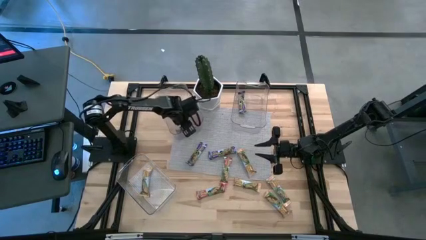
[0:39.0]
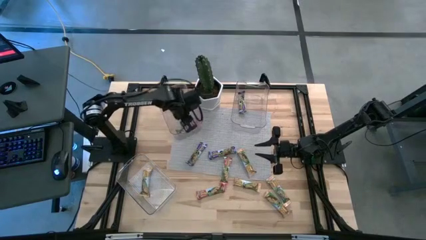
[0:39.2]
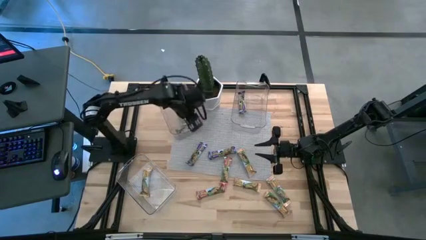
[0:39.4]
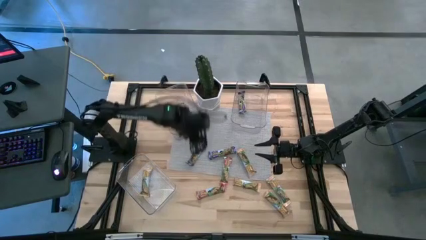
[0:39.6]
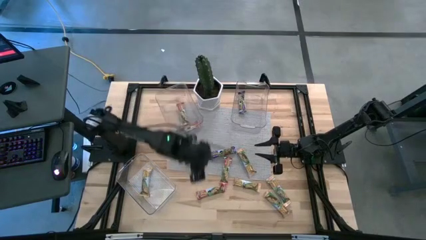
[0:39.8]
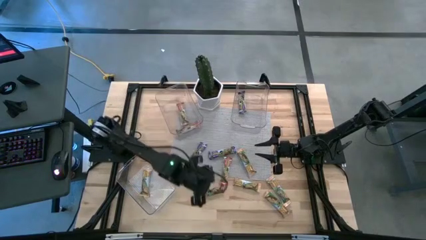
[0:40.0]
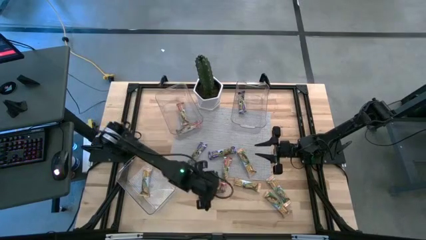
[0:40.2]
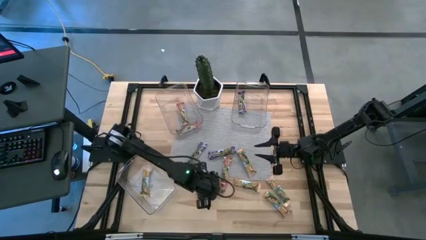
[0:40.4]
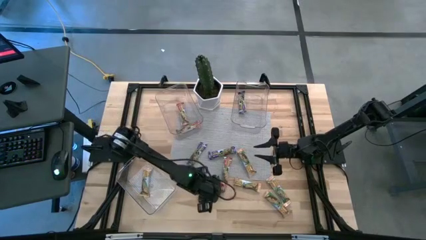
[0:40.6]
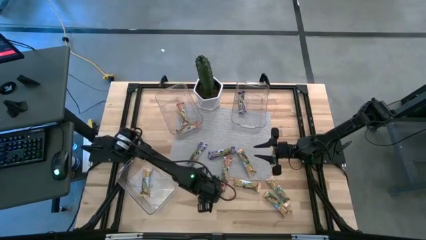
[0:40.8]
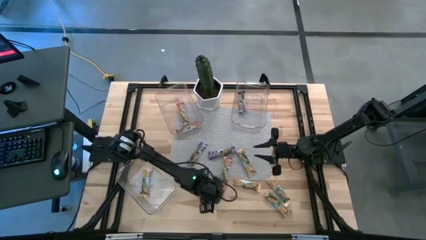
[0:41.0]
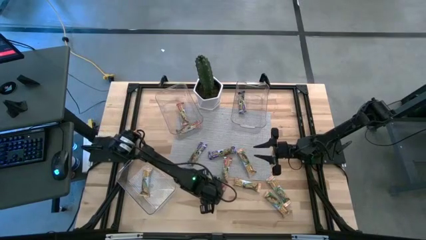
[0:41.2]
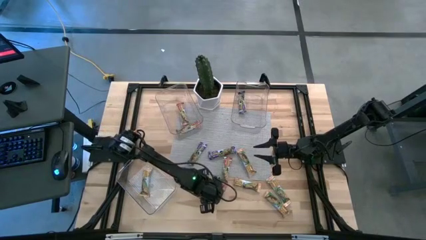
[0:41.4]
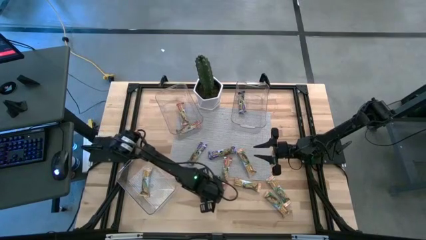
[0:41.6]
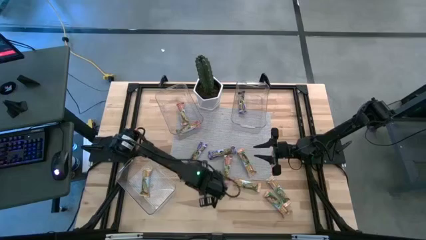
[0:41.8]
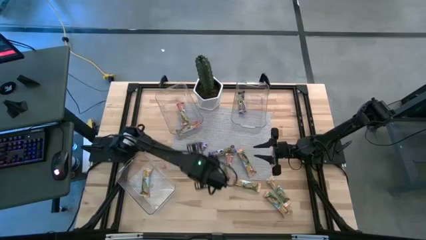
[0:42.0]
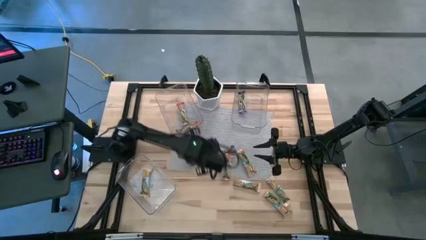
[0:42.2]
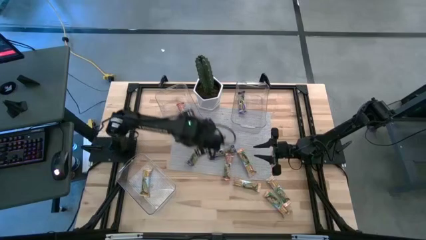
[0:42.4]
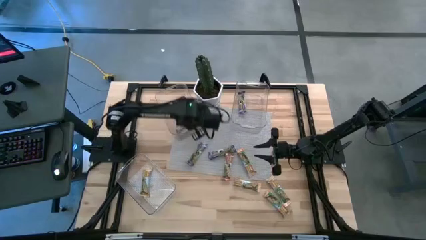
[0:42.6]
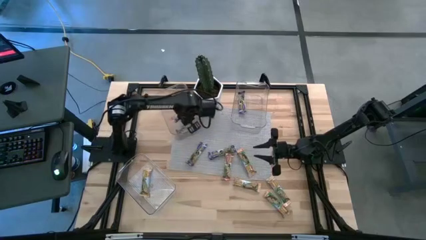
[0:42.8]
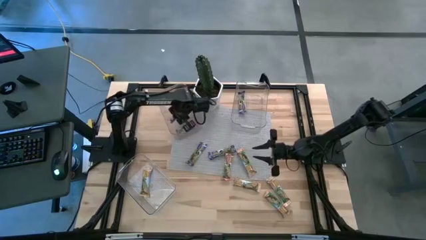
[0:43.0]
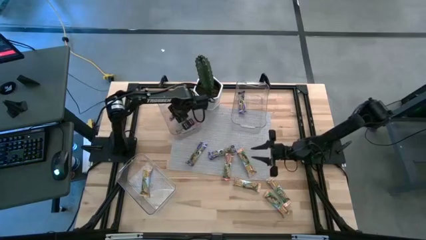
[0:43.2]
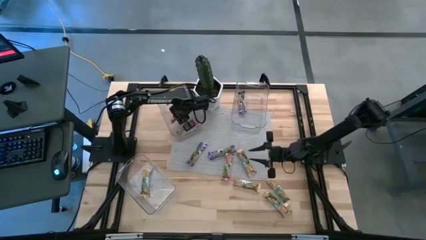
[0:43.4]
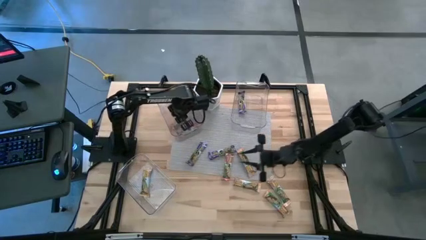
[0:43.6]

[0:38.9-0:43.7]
Task: Pick and place Granola Bars by type
Put the red granola bar into the top left transparent bin

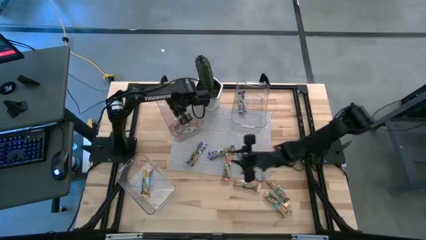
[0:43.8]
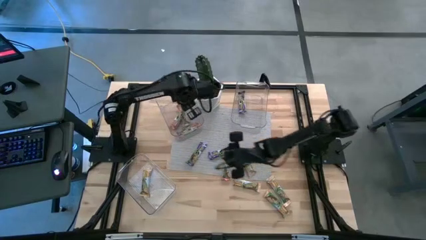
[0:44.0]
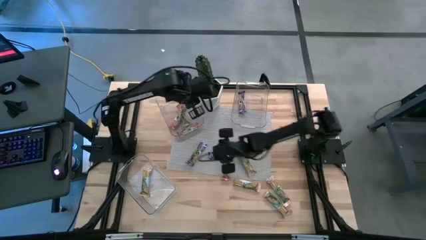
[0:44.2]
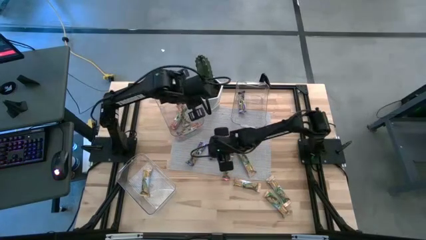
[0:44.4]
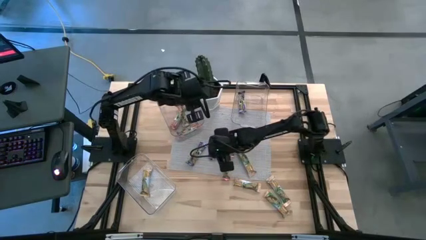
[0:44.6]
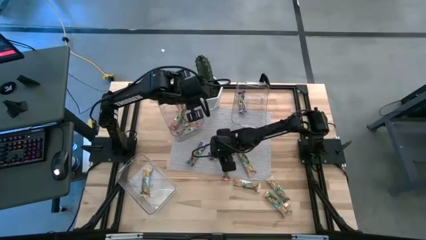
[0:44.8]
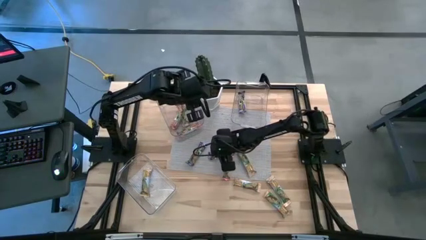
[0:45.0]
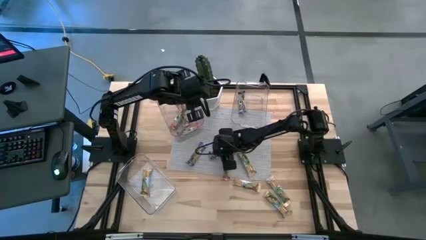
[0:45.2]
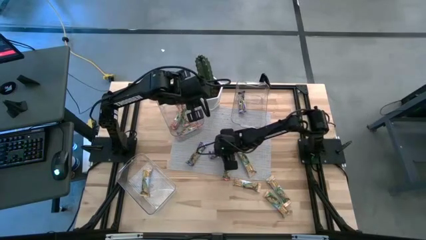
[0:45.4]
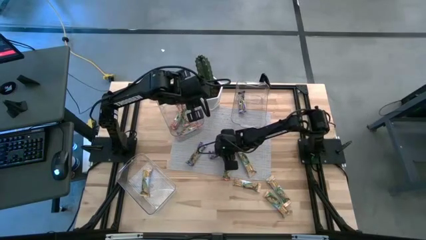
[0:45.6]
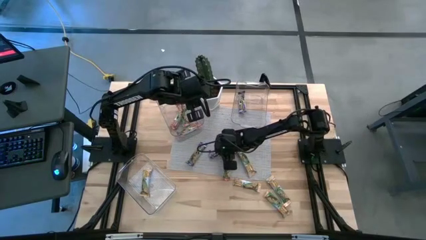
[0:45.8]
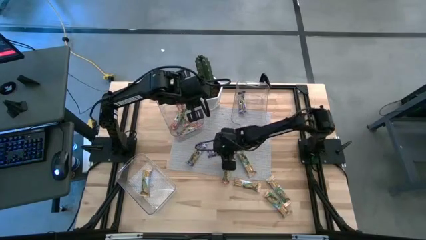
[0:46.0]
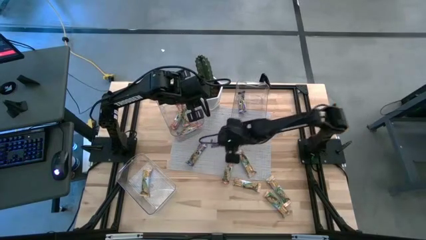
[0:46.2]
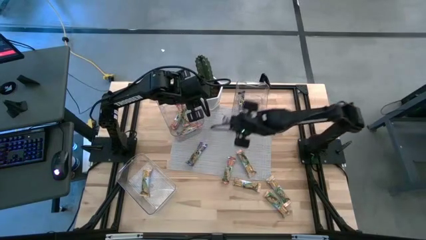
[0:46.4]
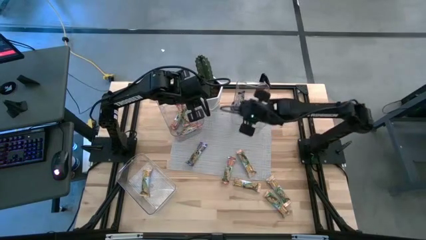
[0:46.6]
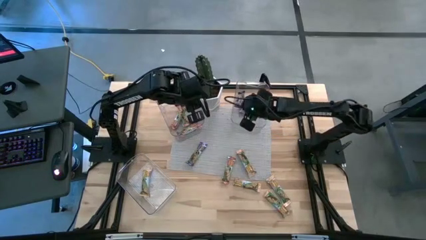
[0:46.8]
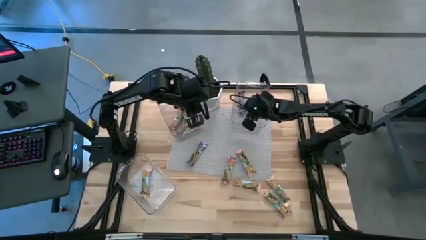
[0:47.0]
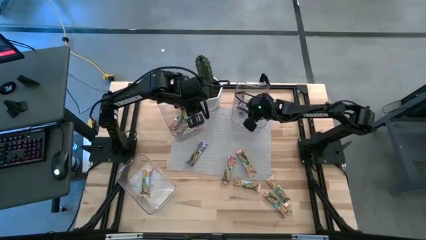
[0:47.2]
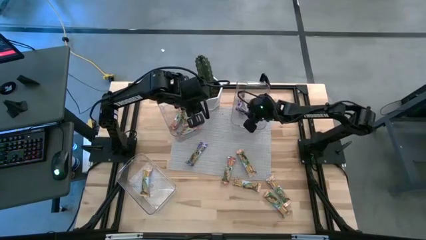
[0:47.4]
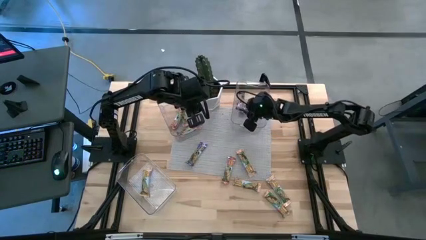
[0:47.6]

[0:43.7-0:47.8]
Put the blue granola bar into the top right transparent bin

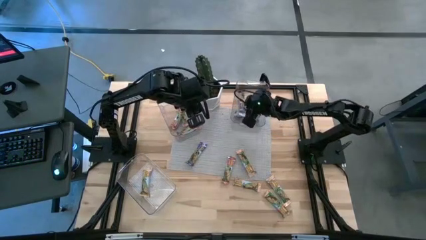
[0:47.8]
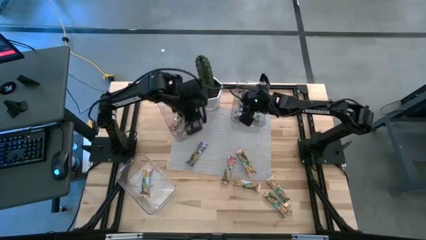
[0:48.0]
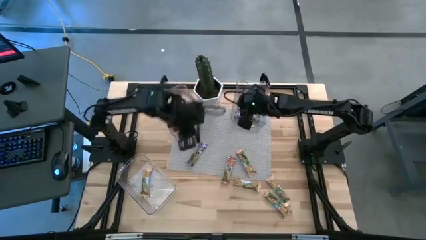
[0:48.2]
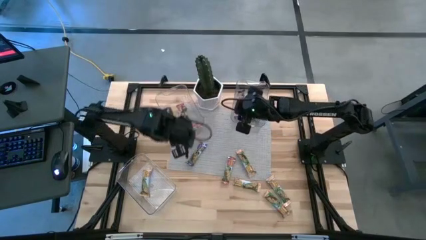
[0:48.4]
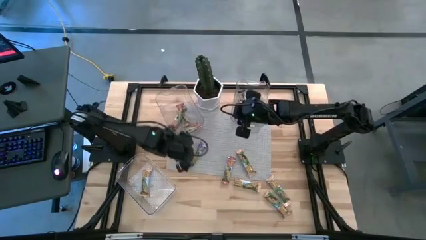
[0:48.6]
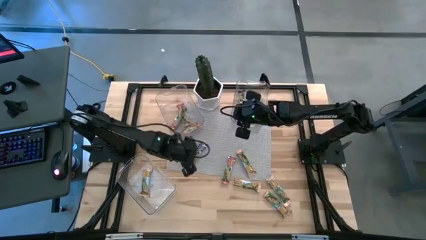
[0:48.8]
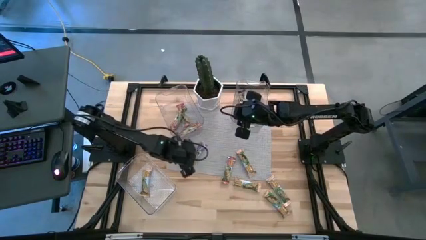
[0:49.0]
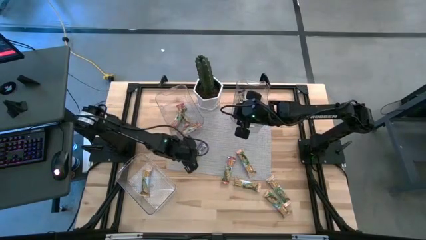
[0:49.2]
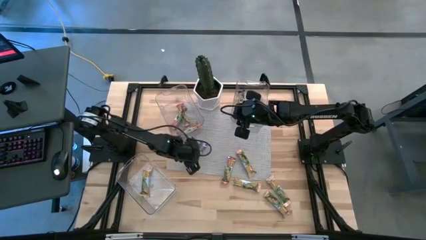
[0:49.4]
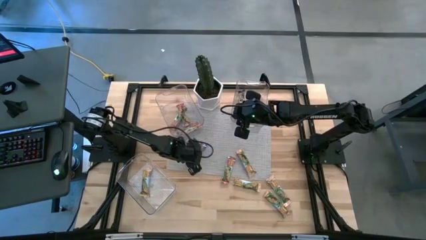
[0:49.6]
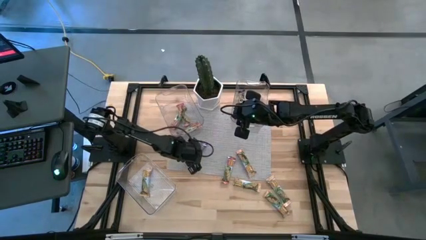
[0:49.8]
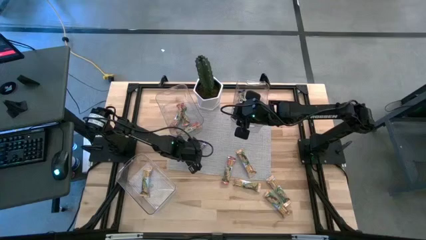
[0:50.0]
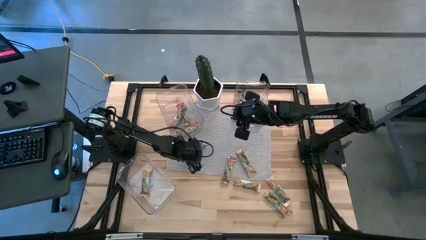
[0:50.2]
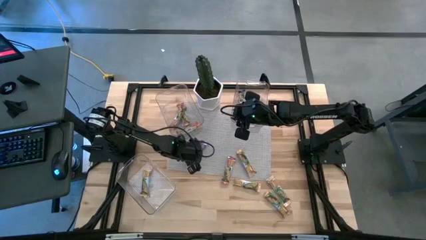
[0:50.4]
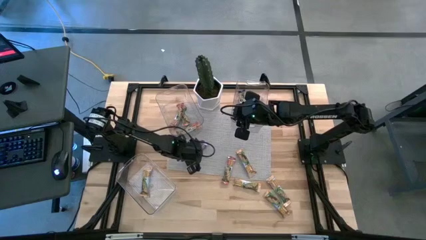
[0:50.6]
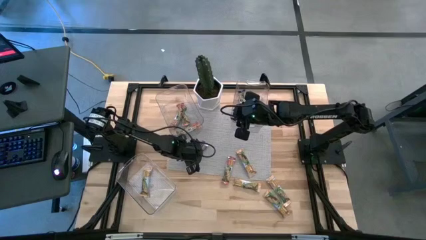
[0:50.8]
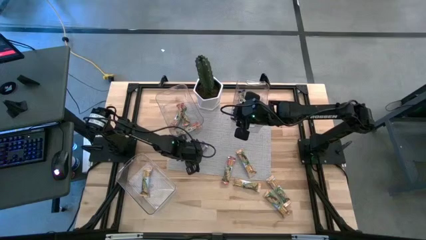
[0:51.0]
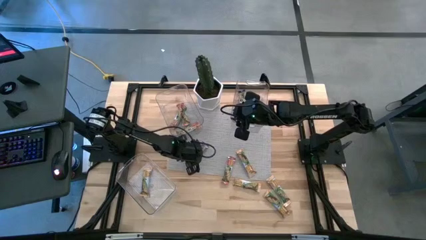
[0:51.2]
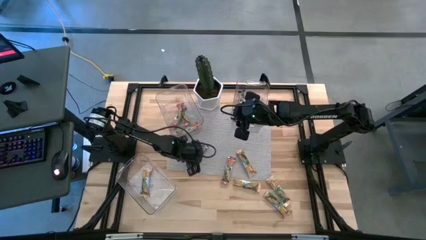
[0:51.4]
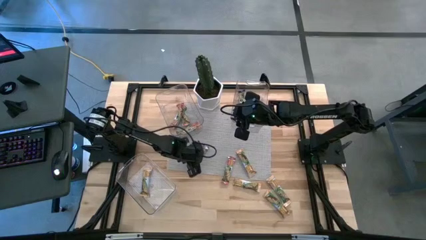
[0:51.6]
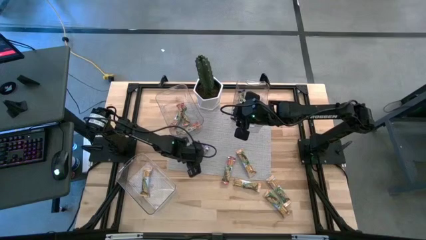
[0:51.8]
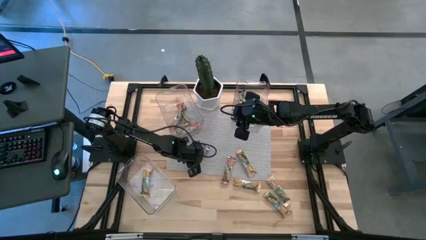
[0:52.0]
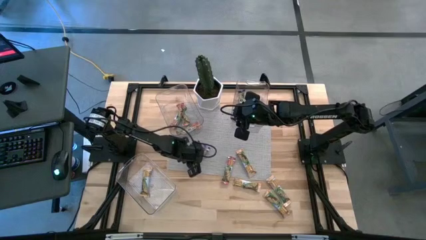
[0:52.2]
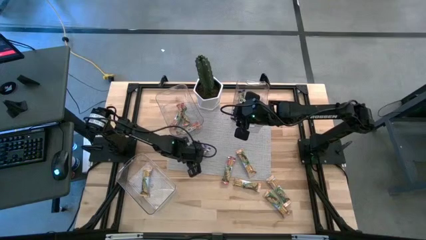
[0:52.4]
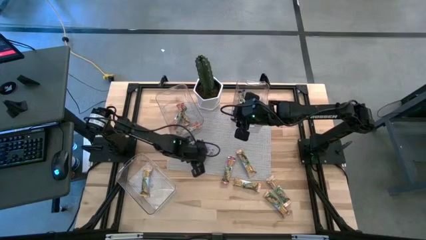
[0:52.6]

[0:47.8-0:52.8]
Put the blue granola bar into the top right transparent bin

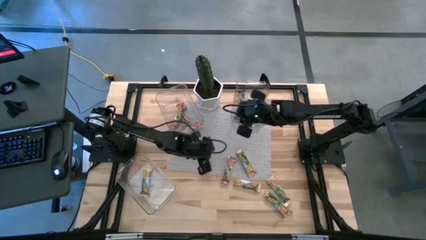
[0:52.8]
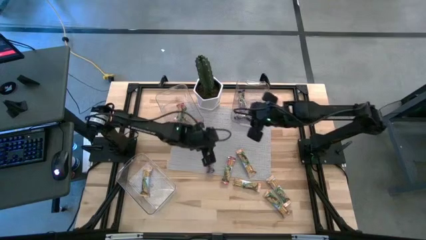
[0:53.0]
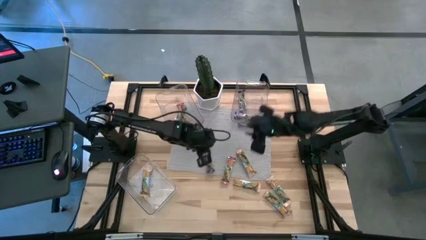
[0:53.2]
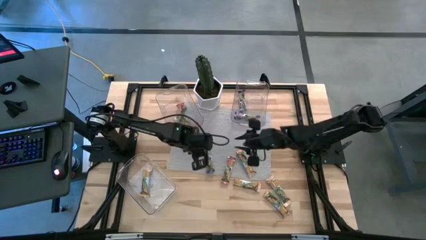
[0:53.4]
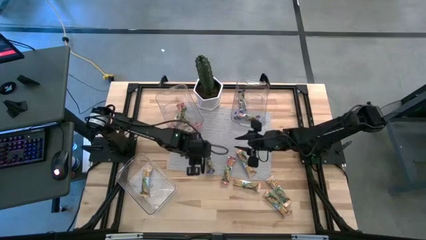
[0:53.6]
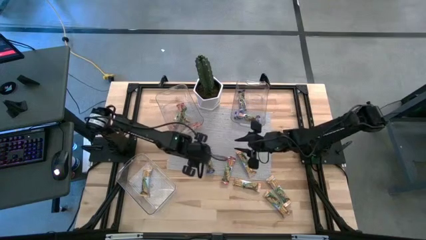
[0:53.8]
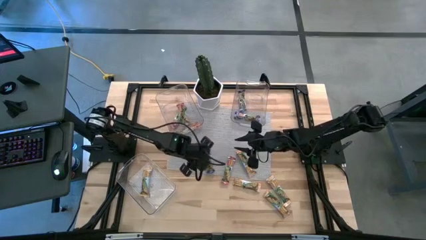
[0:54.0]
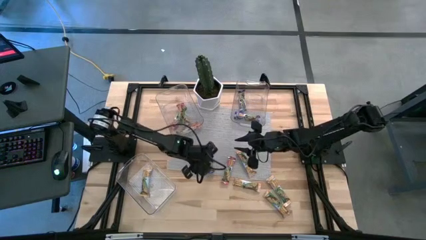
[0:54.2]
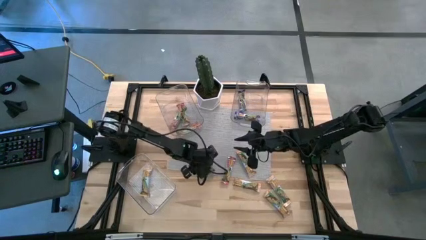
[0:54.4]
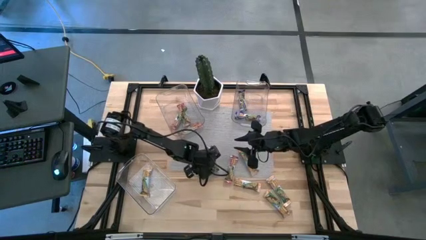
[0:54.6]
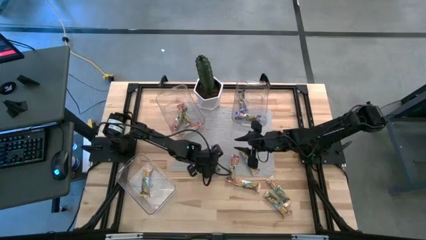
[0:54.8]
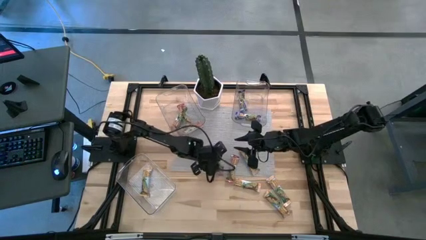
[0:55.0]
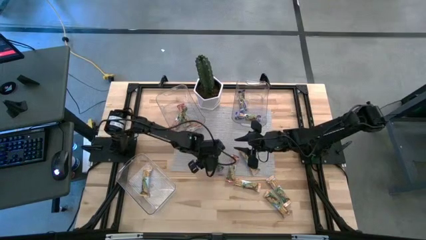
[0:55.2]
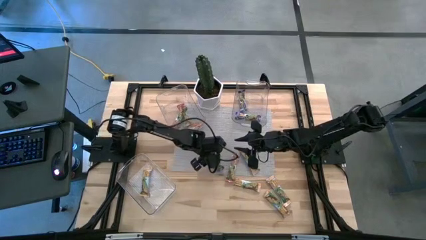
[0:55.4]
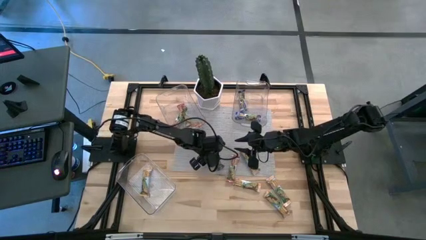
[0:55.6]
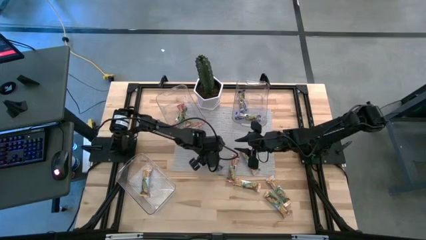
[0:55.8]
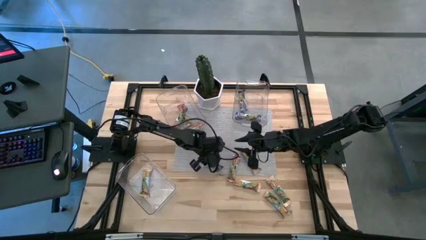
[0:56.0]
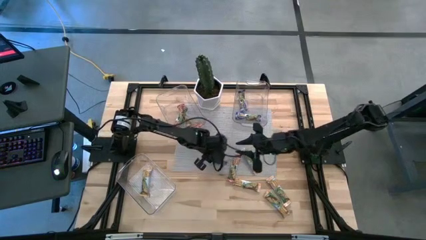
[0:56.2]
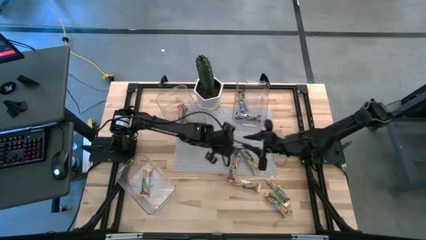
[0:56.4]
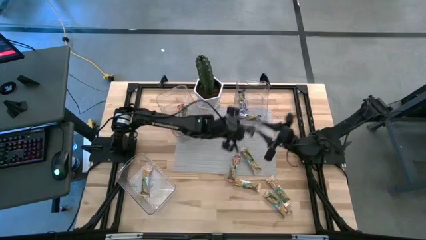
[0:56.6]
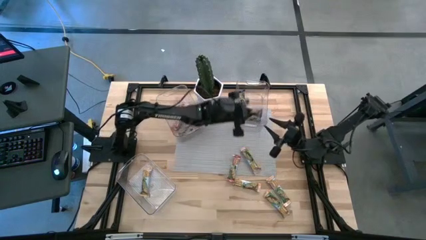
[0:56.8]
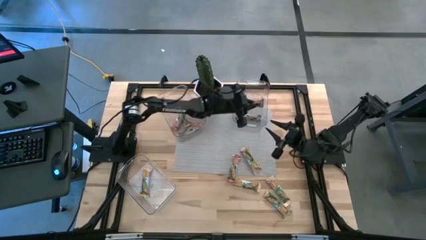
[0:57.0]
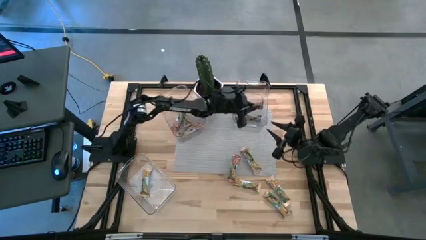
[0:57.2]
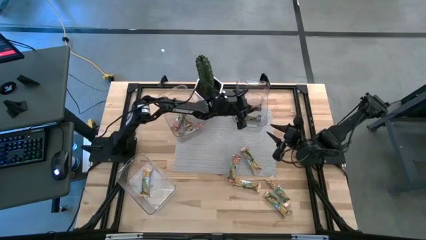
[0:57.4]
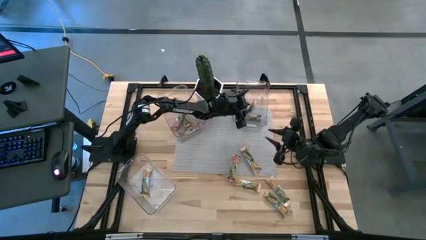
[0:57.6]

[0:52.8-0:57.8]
Put the blue granola bar into the top right transparent bin
